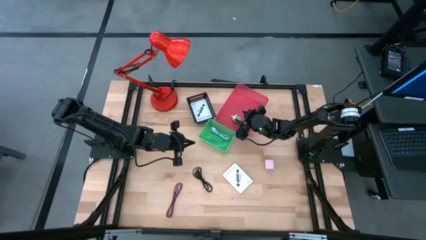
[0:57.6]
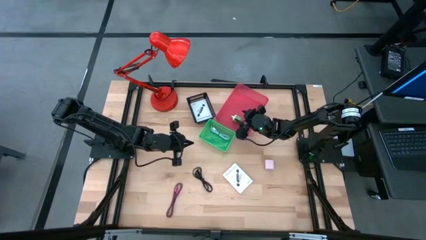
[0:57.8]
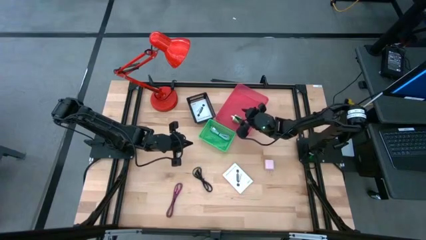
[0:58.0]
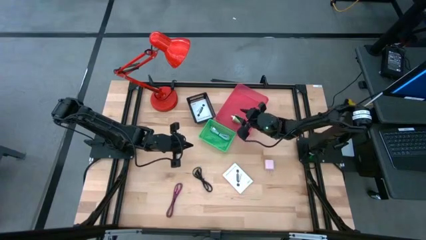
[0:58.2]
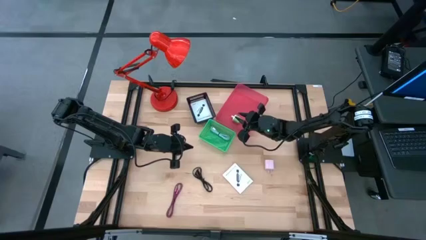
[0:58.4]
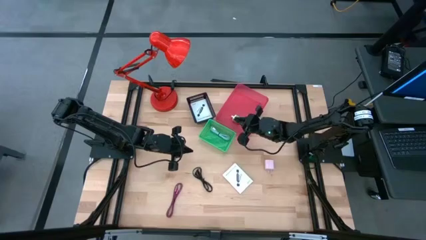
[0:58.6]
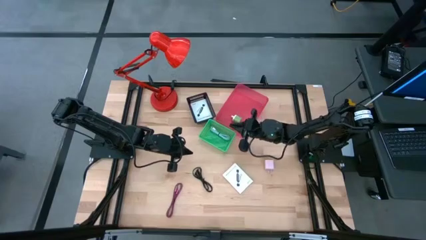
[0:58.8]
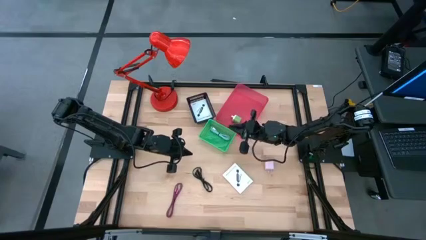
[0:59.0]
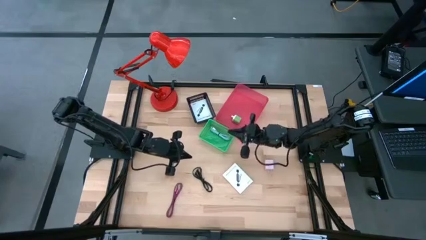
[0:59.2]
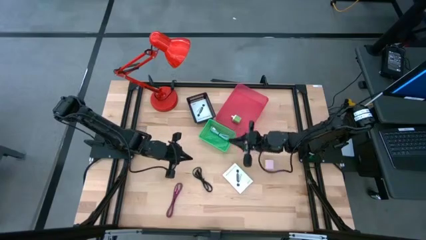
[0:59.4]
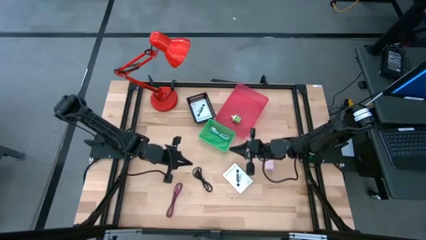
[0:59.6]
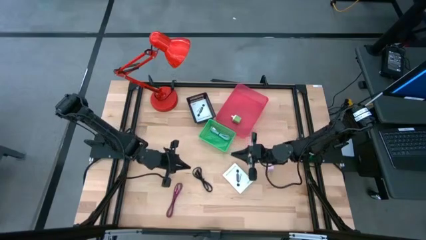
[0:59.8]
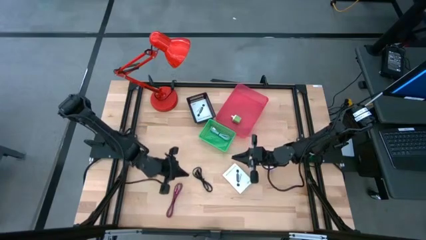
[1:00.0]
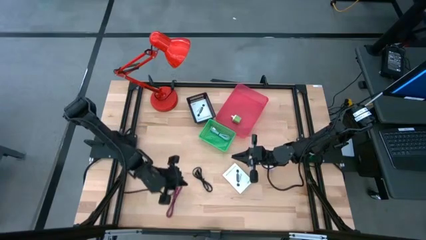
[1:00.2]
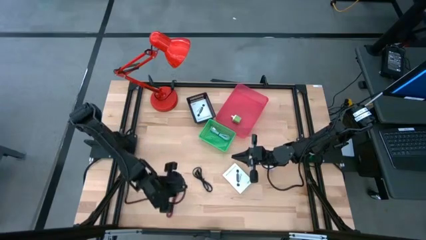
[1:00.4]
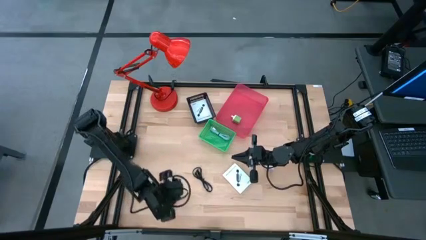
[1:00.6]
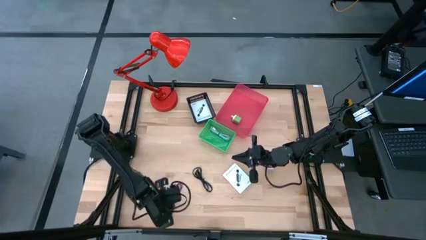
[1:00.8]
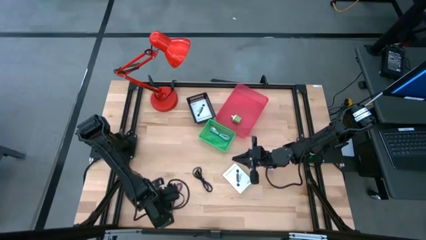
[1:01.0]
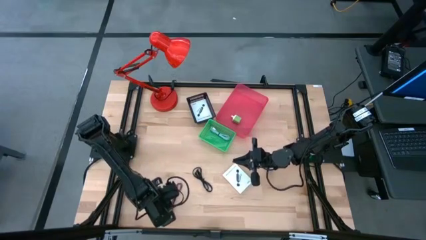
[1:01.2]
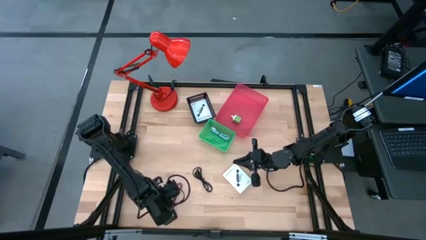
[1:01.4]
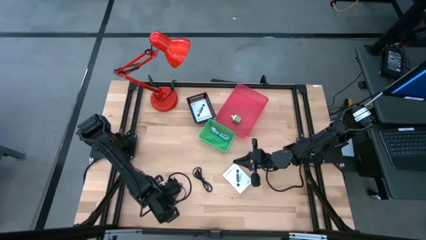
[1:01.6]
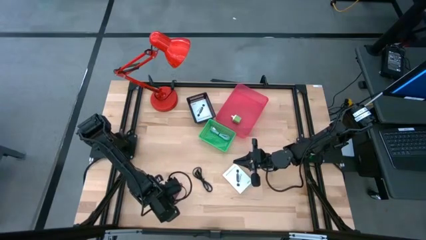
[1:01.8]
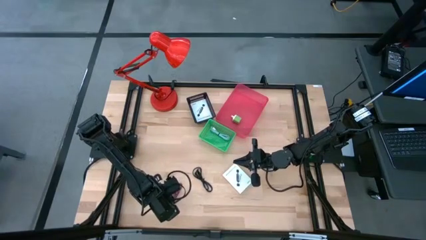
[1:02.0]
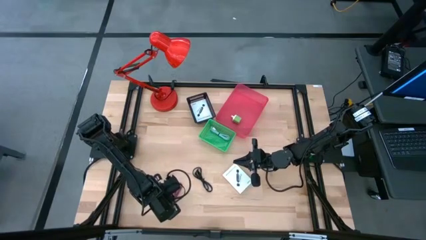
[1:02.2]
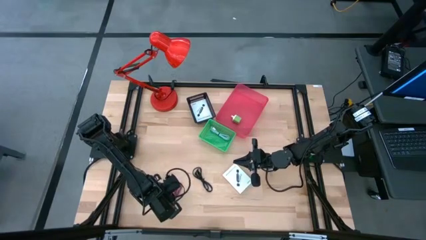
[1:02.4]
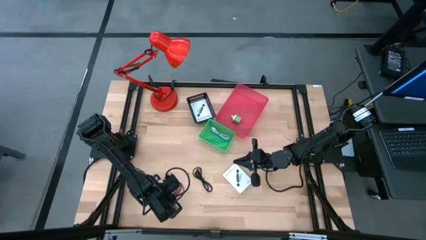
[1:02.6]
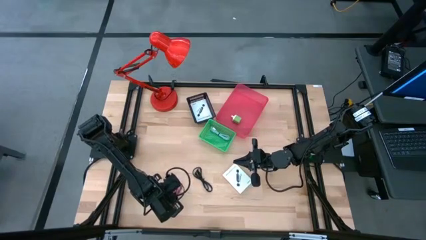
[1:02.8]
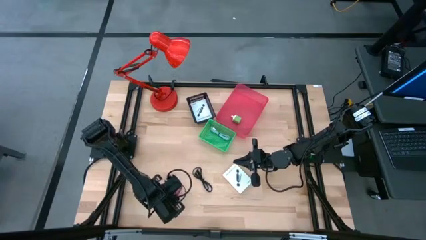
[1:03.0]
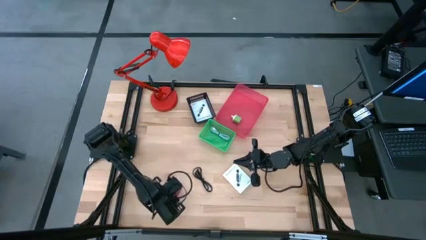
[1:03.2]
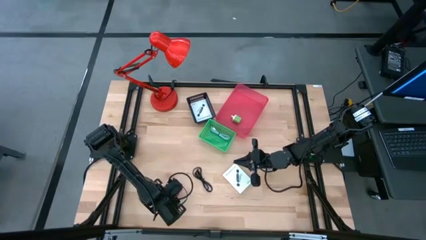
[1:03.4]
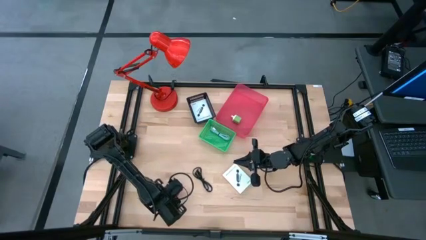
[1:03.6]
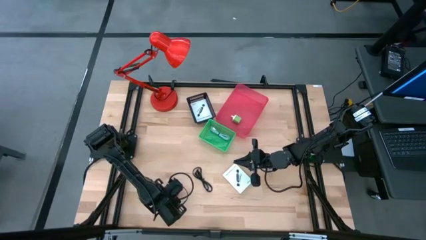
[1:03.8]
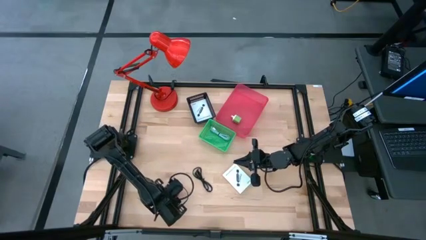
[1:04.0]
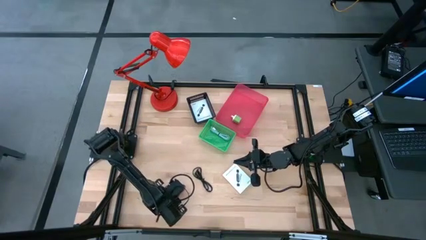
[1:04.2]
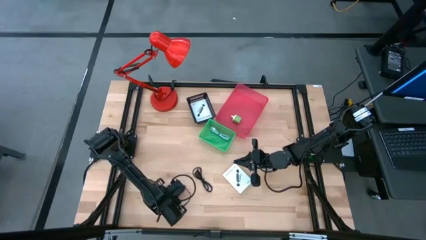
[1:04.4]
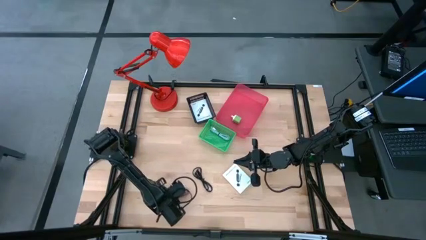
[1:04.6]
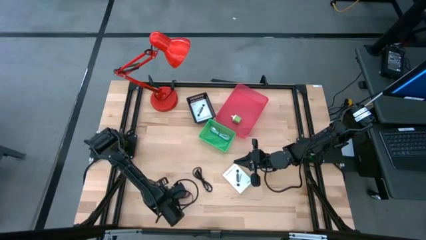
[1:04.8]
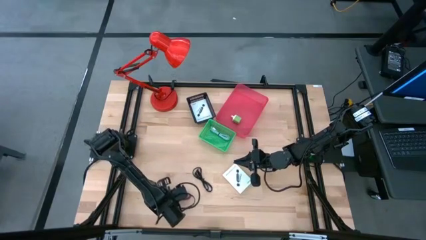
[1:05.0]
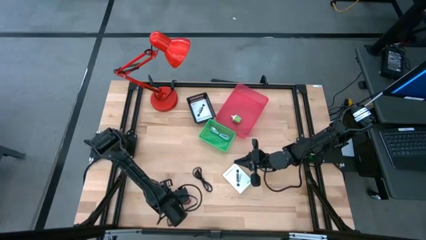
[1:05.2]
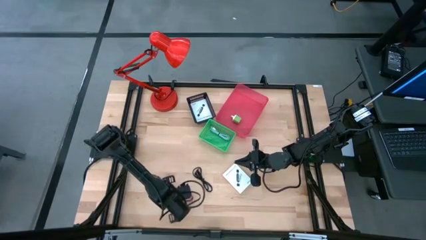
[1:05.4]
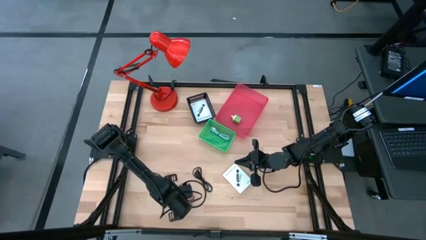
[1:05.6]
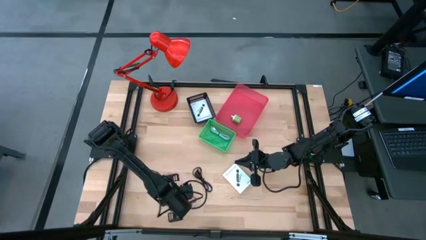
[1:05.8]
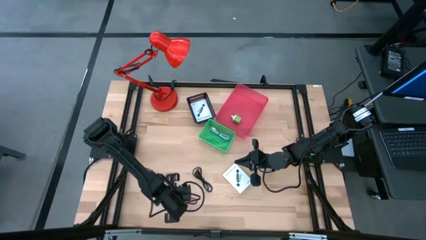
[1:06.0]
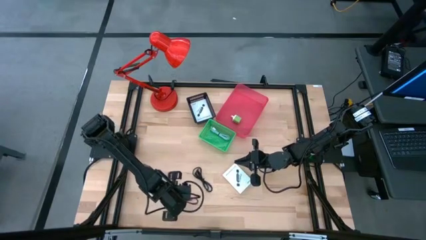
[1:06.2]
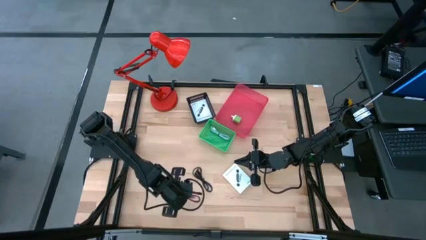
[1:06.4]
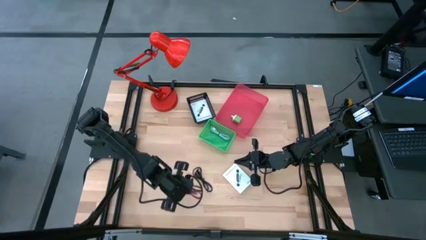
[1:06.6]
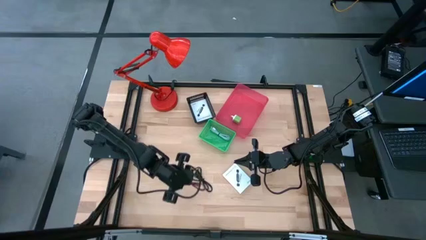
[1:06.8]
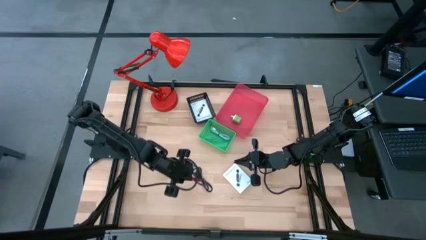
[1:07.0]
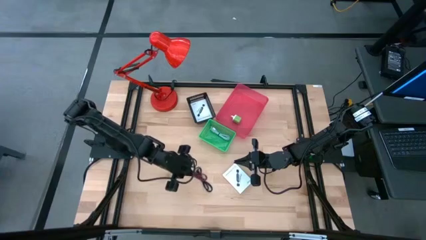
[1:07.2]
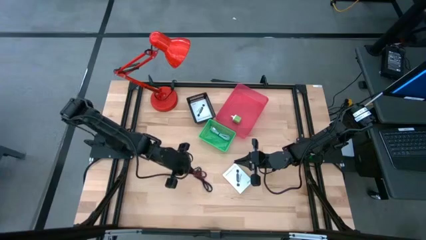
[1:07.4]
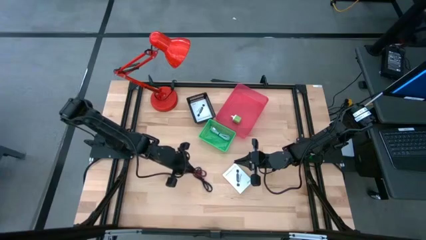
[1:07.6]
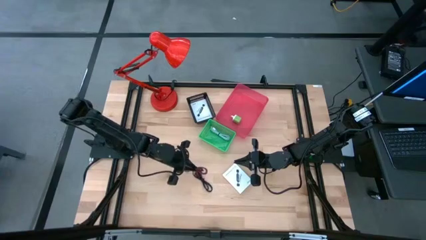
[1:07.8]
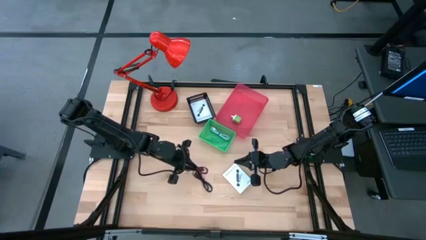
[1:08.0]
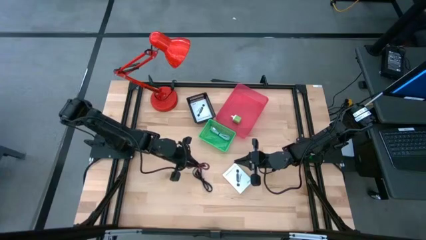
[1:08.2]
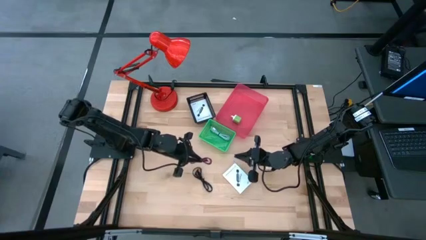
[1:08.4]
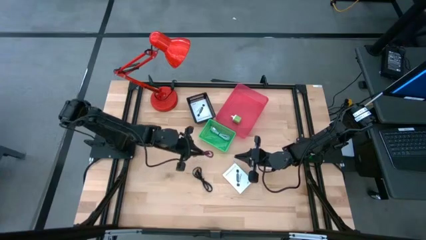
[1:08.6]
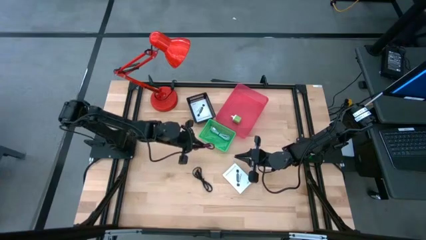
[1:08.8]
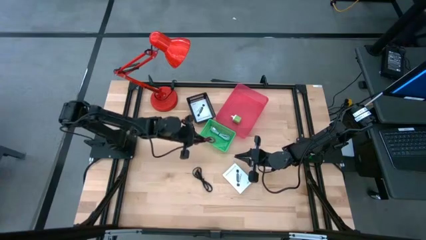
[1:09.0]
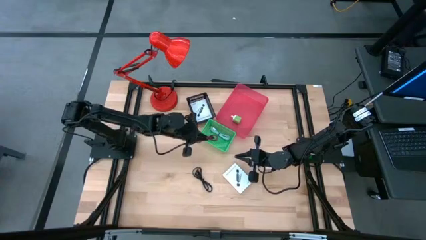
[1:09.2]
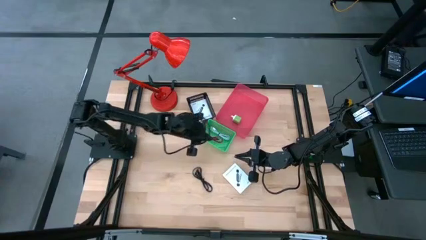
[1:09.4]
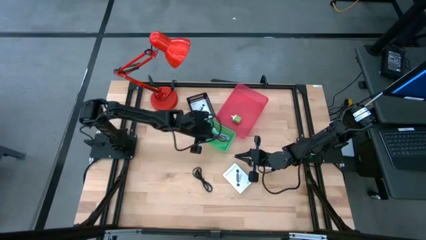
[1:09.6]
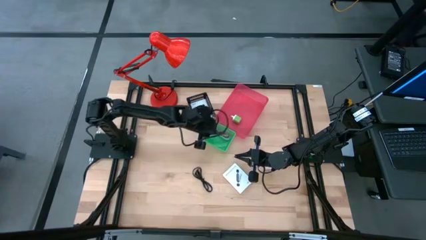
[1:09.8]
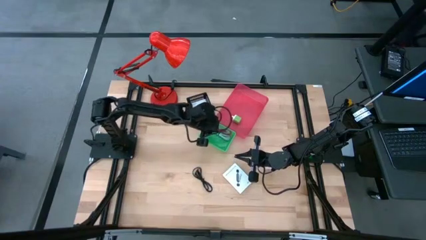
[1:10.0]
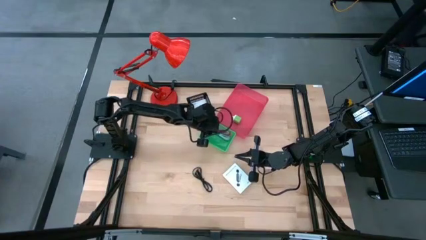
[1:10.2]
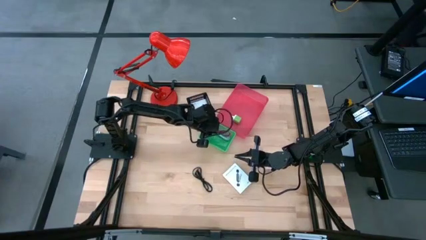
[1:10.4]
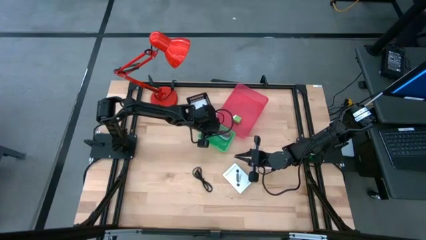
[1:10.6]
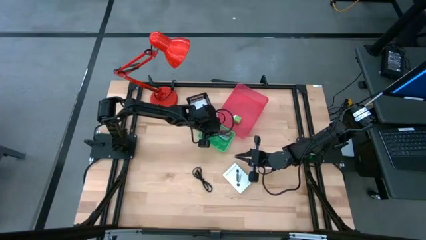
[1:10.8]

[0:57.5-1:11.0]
Task: Pick and place items into bin
Put the purple charger cable into the green bin

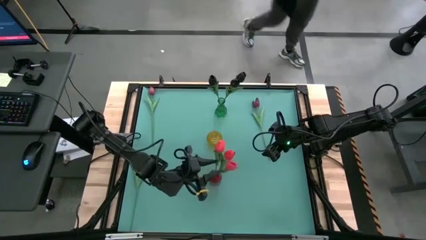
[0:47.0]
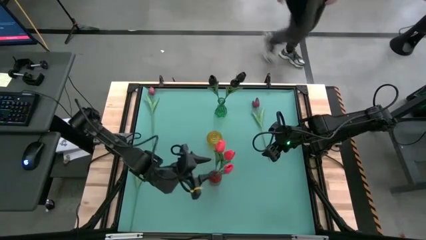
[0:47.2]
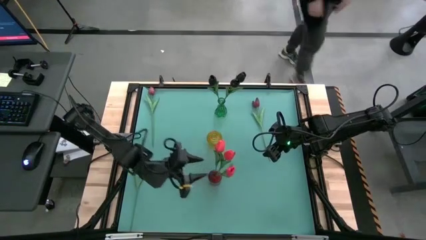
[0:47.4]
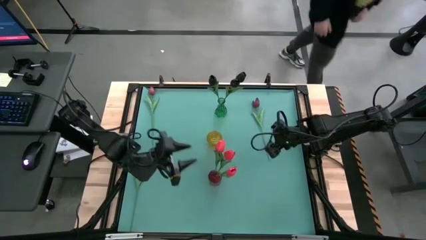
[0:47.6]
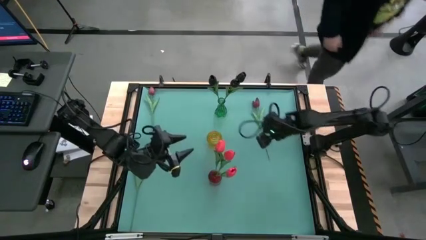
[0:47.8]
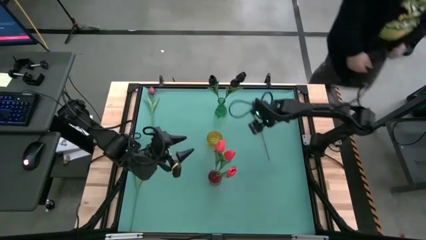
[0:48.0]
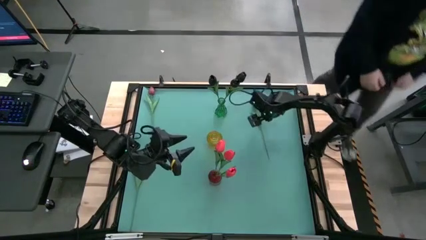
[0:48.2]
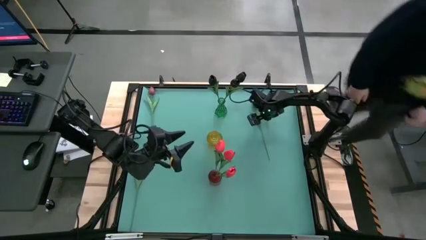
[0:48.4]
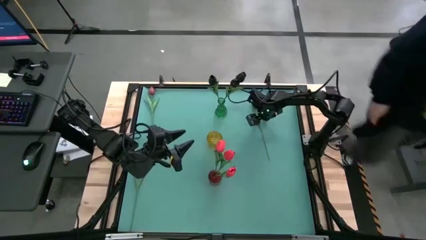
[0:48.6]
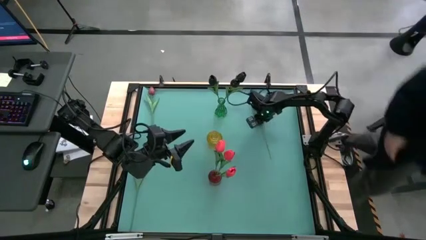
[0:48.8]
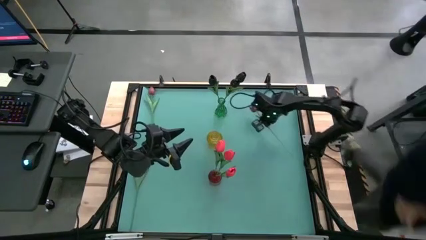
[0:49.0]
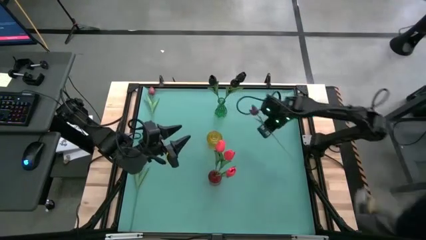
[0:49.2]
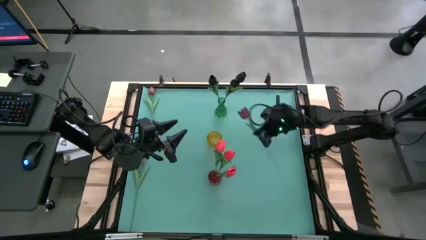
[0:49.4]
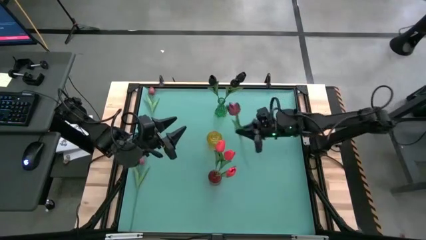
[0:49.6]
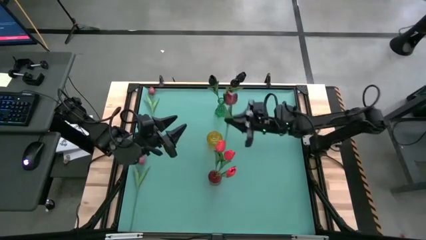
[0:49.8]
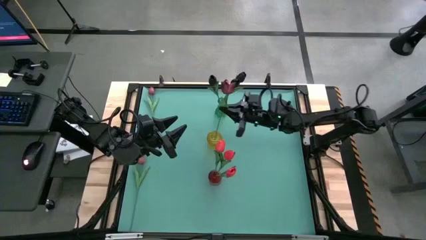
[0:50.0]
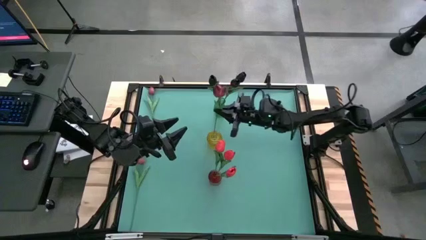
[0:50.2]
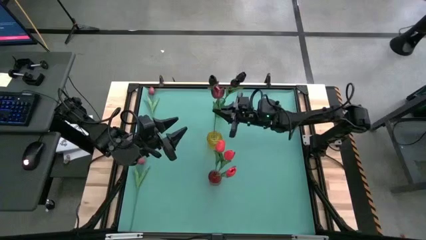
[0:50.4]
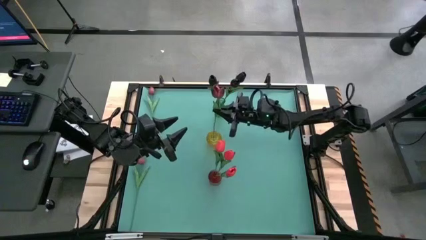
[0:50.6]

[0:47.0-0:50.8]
Task: Sort flowers into vase by color
Put the top right red tulip into the yellow vase
